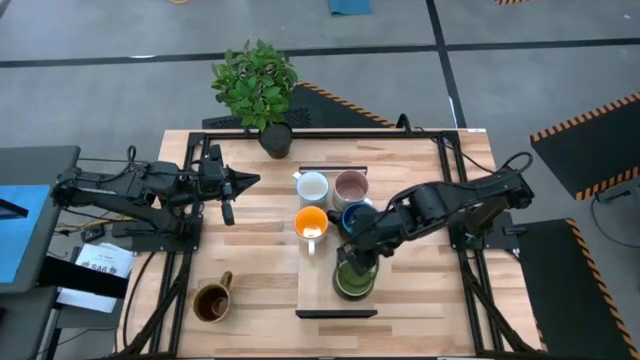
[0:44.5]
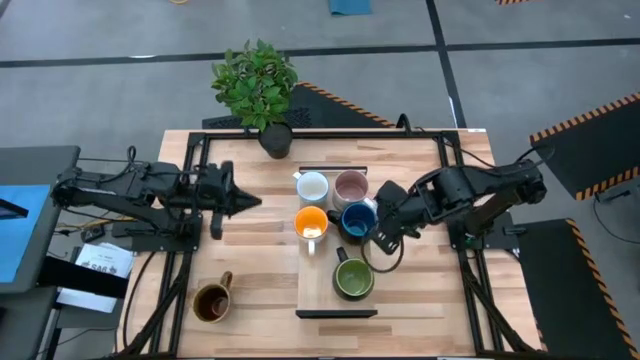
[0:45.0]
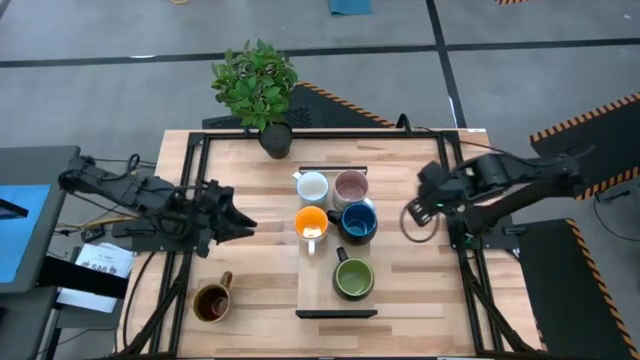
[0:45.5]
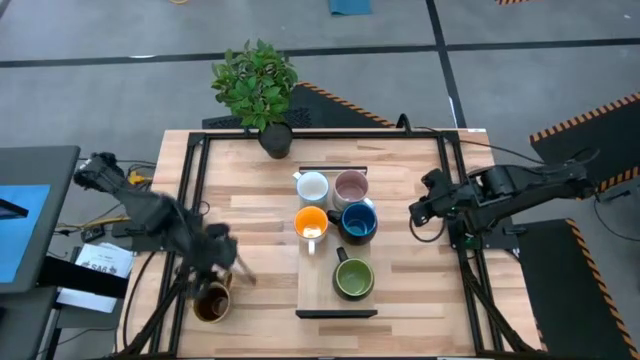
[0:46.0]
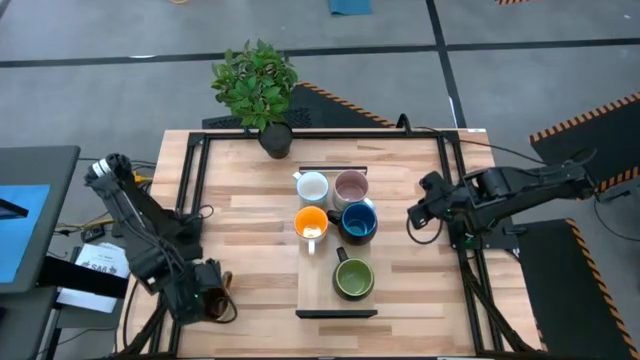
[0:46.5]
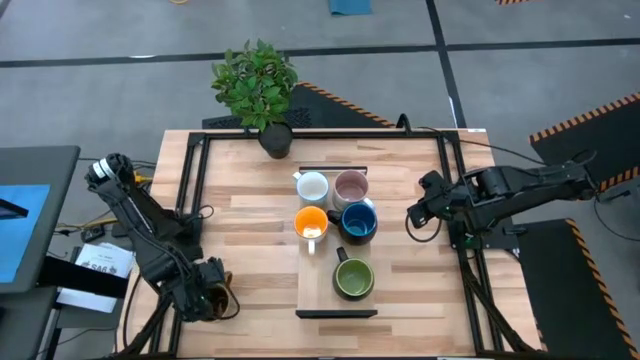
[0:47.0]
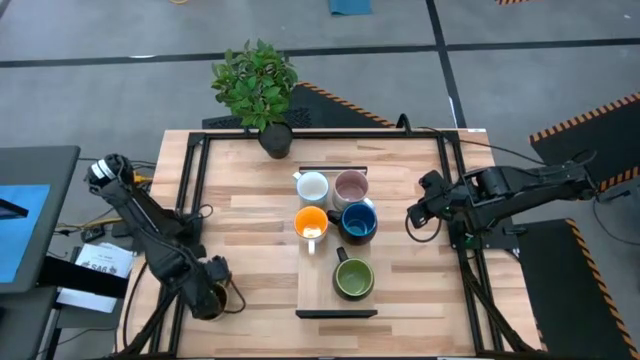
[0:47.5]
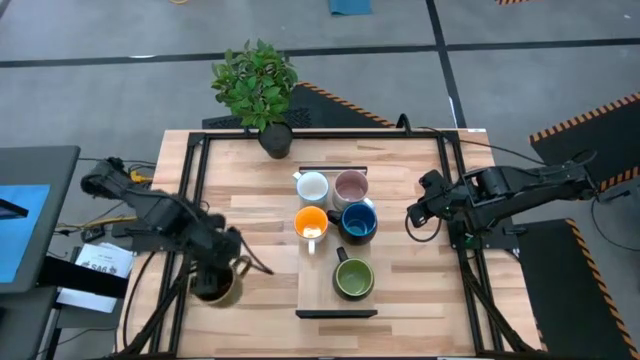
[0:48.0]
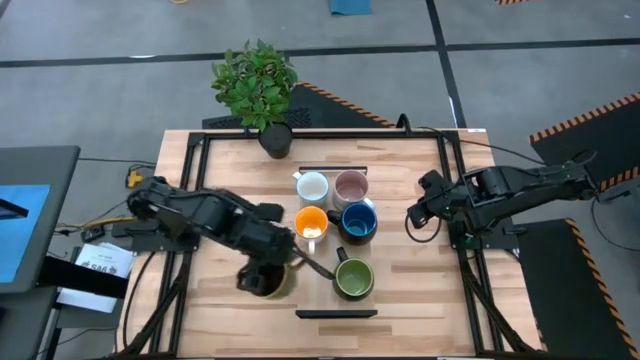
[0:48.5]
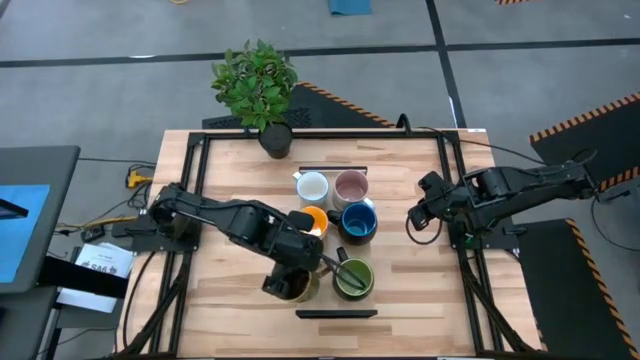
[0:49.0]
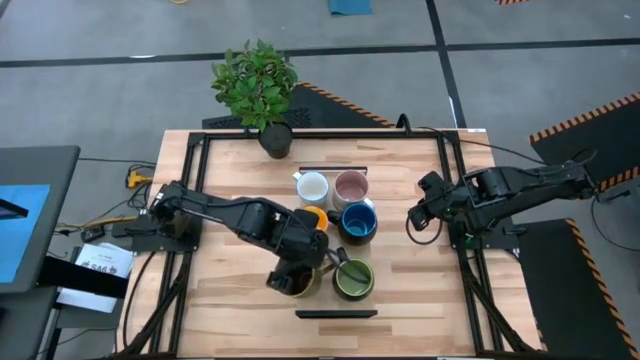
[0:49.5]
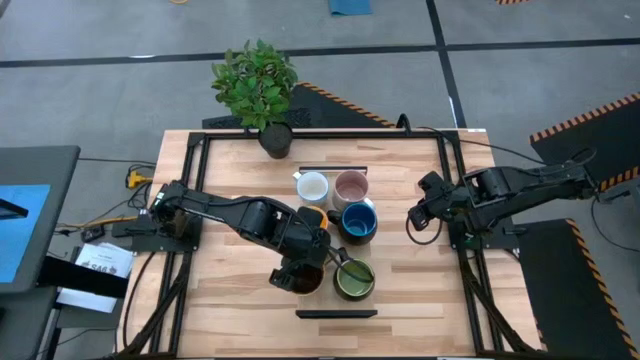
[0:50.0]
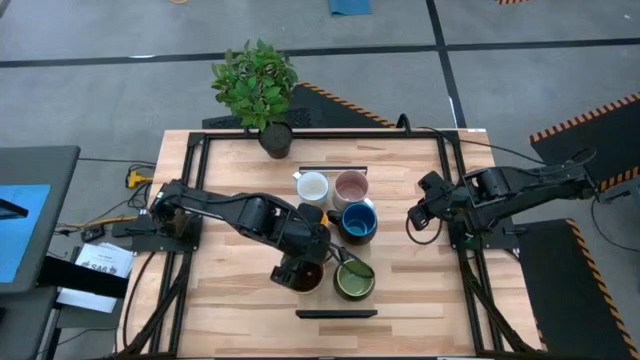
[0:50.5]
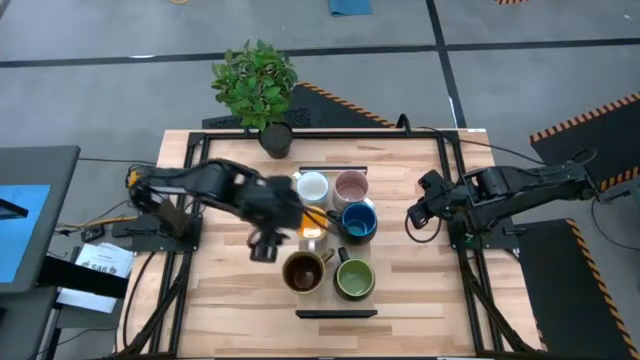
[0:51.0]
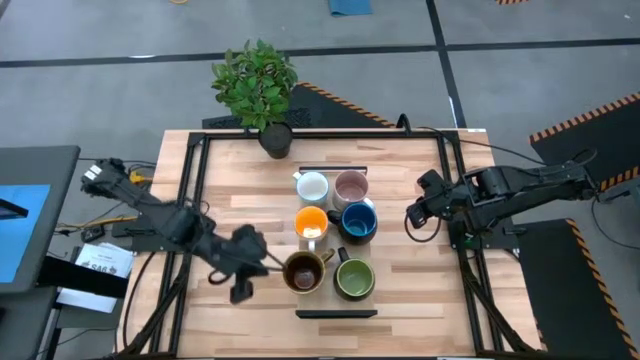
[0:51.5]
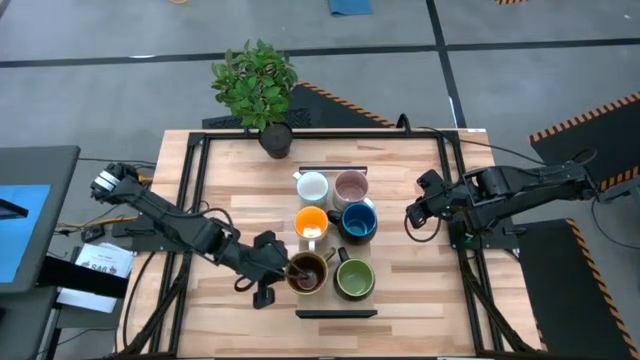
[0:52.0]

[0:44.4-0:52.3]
Task: Place coffee mugs
Put the brown mug on the shelf

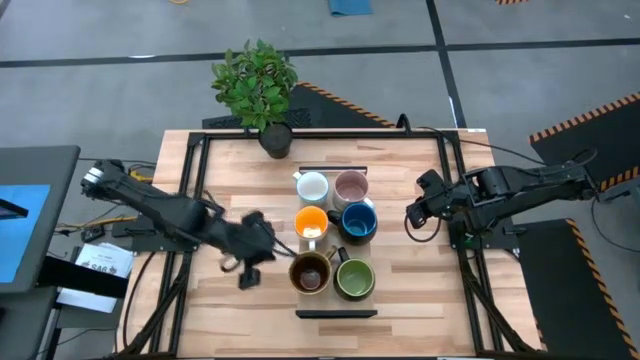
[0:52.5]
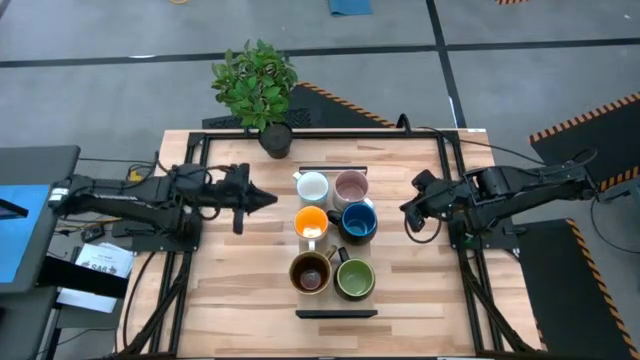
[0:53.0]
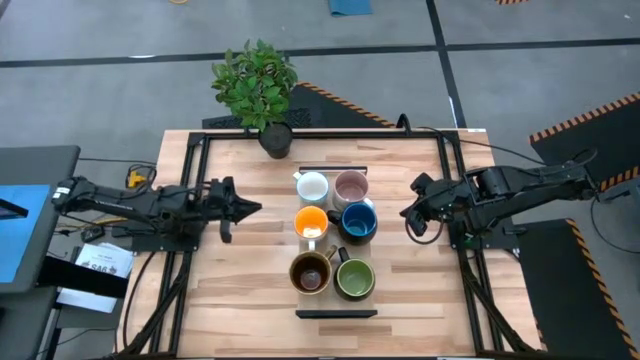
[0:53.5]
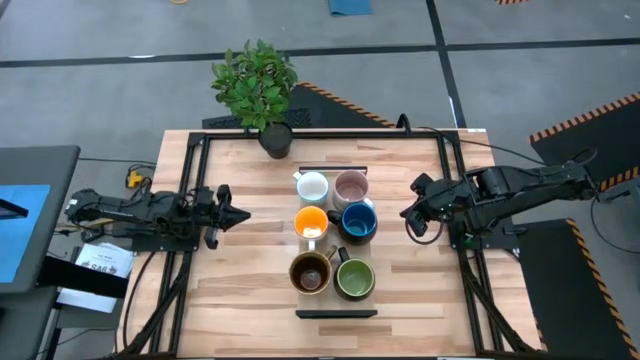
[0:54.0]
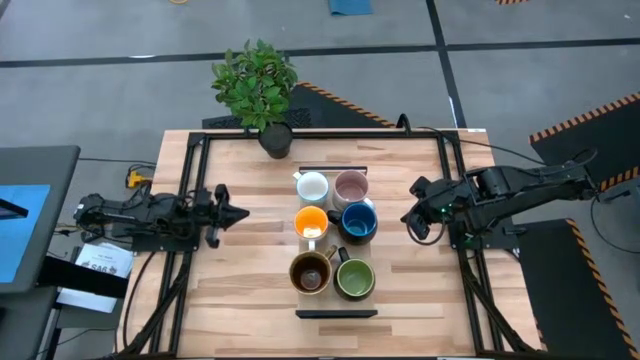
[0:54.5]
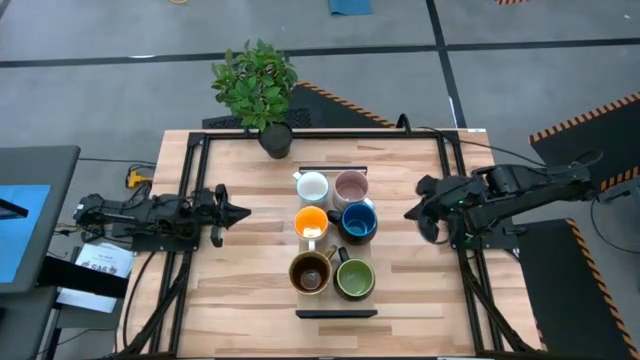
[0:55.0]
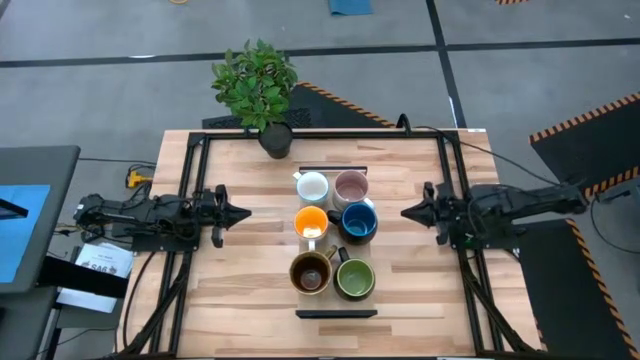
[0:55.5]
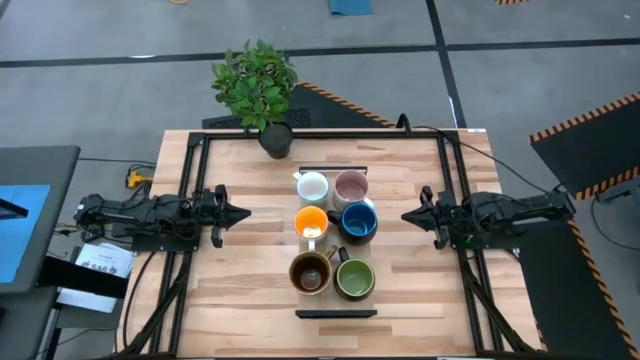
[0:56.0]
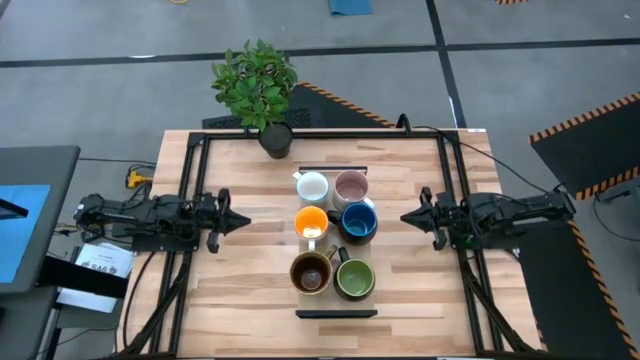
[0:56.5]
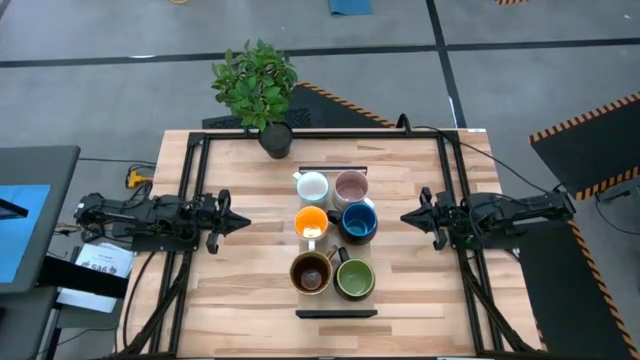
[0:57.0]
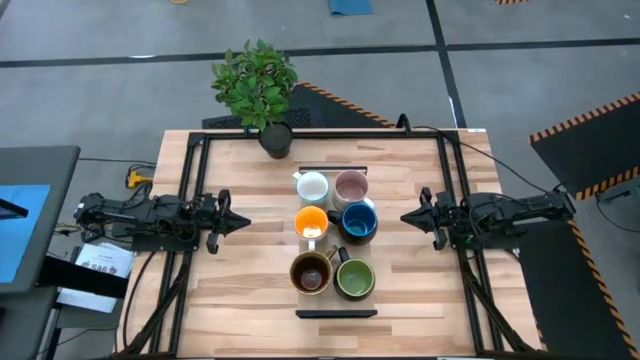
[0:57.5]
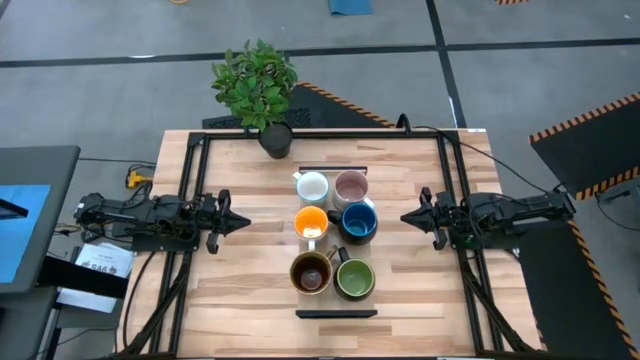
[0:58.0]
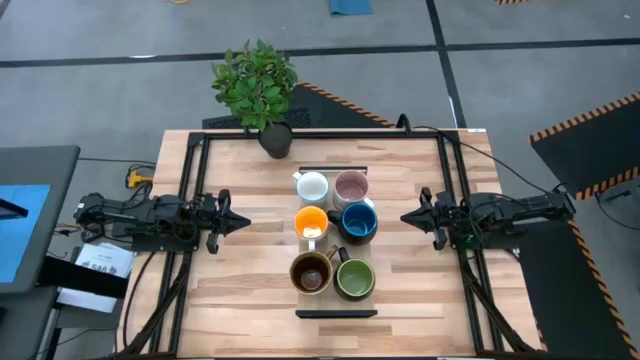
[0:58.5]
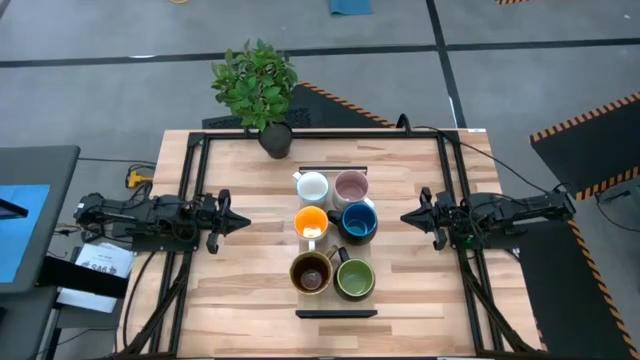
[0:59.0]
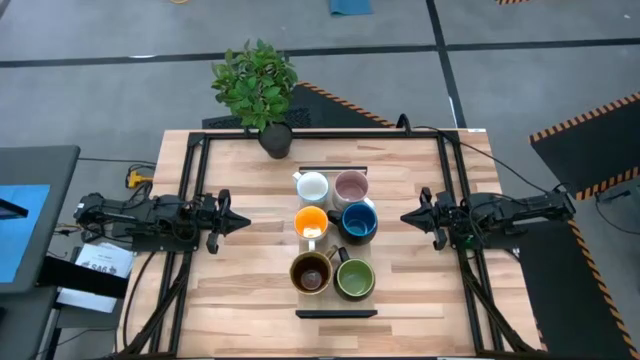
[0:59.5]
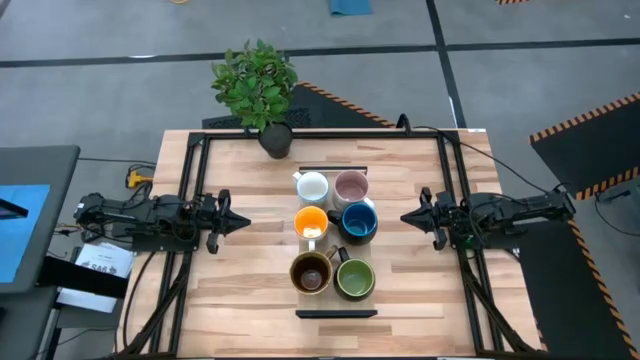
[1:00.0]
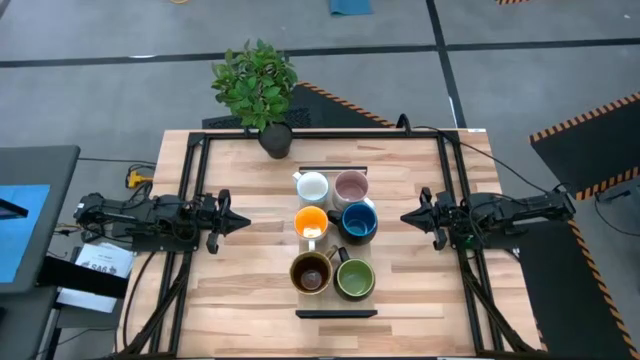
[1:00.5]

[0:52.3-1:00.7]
Return to Home Position

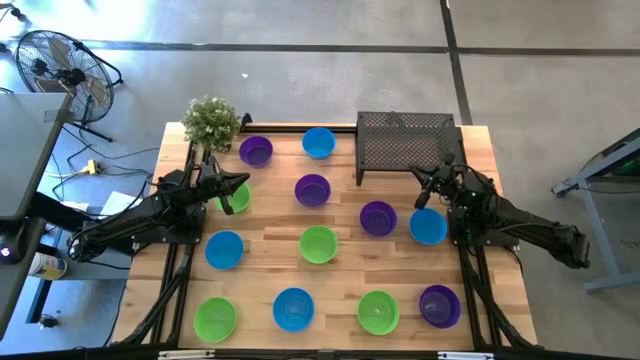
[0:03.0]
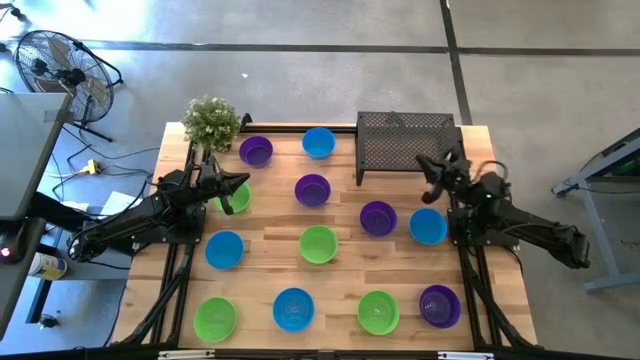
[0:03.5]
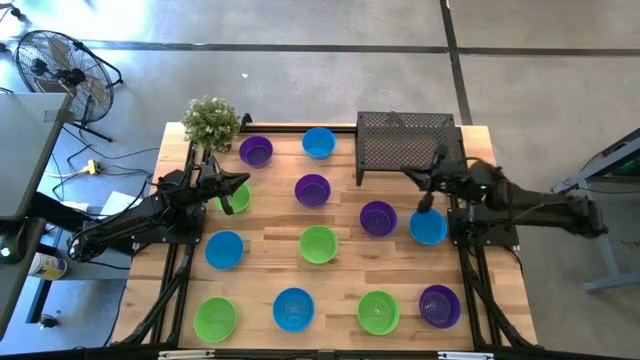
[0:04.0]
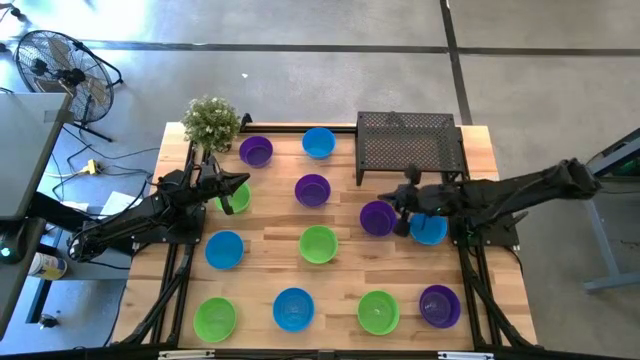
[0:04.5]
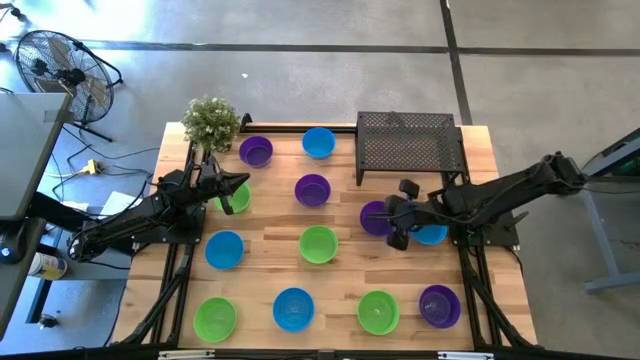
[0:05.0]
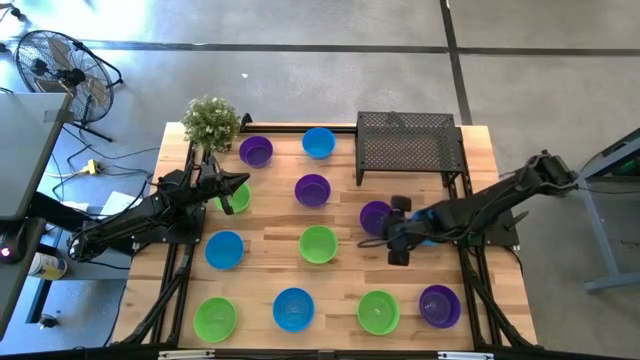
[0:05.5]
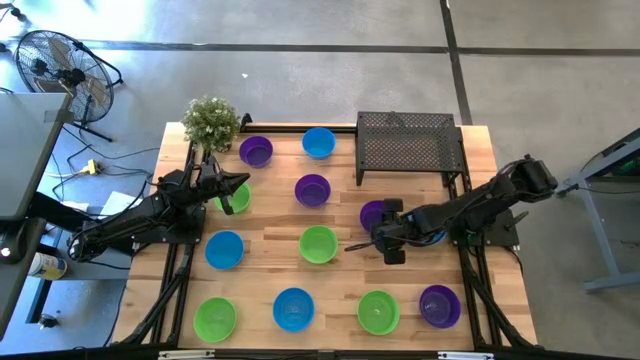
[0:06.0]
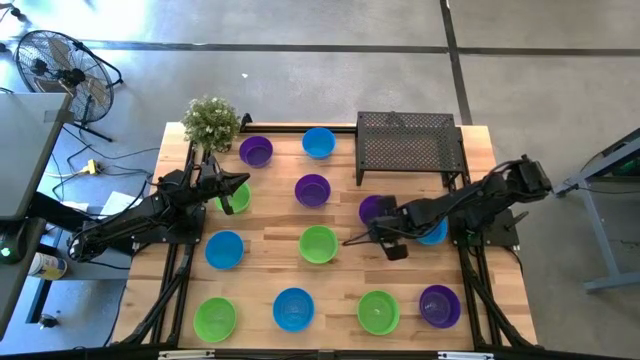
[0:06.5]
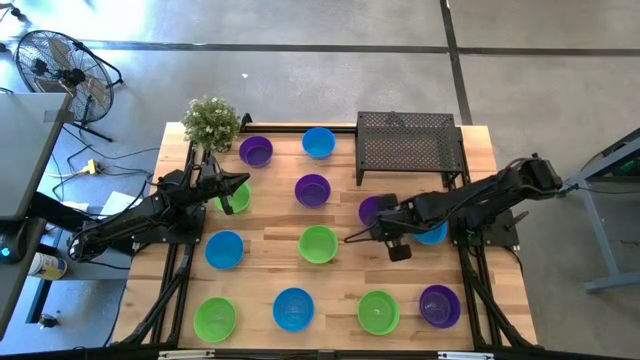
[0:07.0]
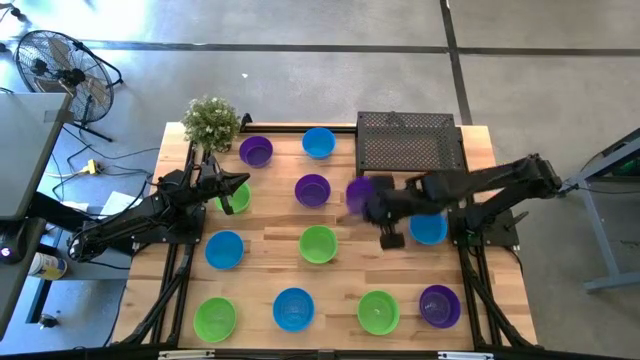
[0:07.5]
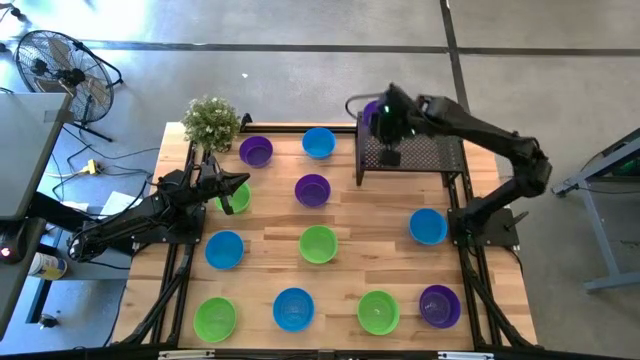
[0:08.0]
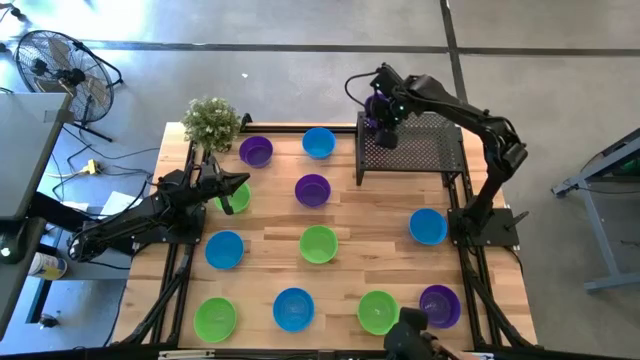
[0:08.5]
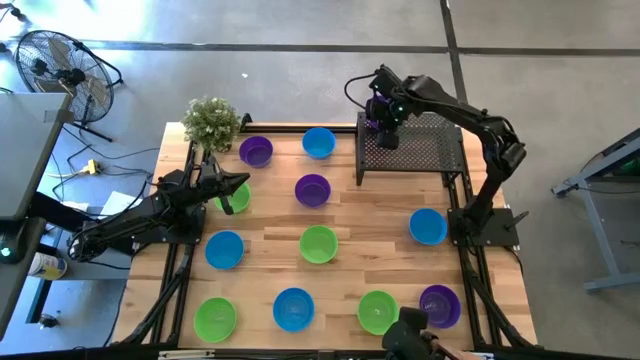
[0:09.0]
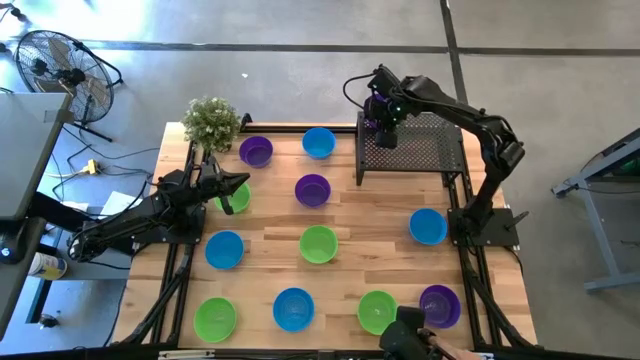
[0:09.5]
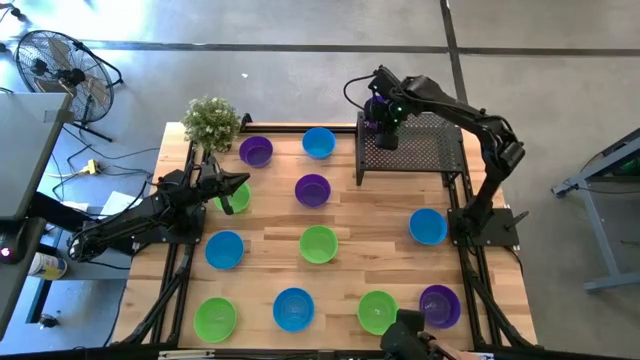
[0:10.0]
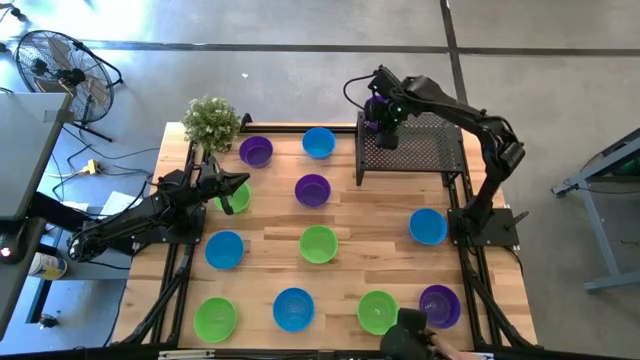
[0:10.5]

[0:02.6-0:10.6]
Task: Pick & Place Mini bowls
Put the violet bowl on the shelf
